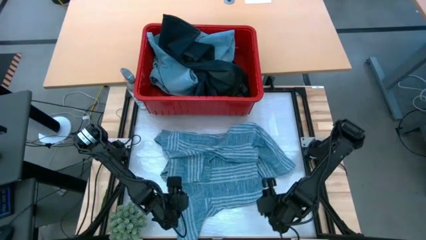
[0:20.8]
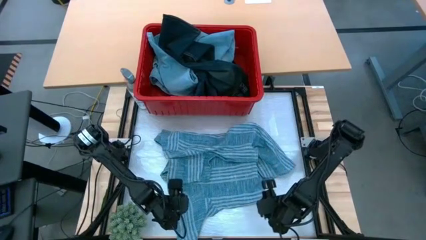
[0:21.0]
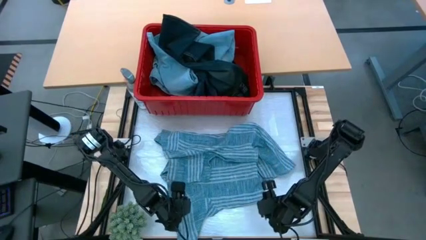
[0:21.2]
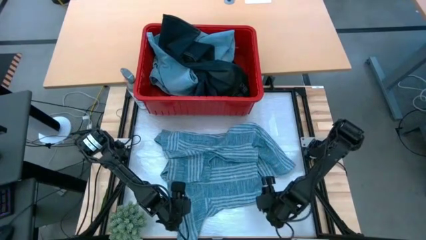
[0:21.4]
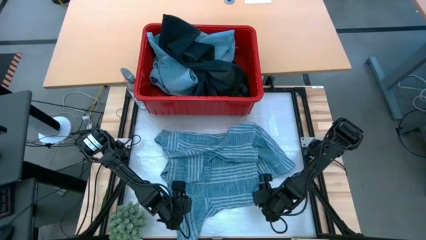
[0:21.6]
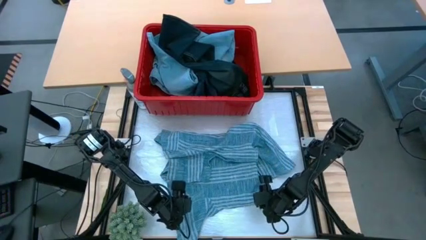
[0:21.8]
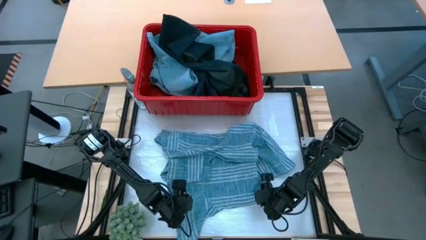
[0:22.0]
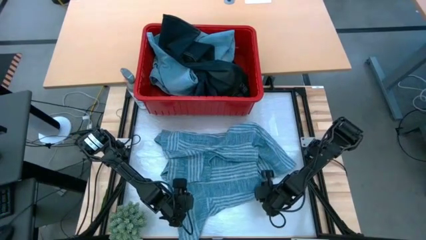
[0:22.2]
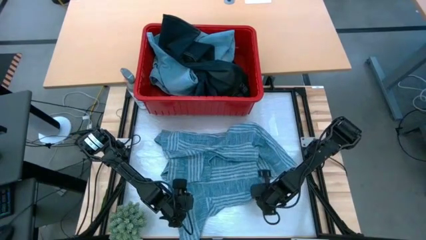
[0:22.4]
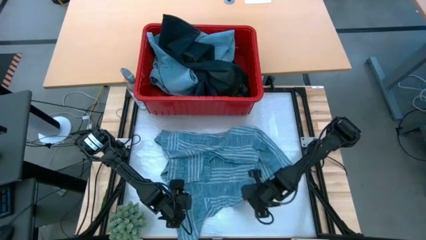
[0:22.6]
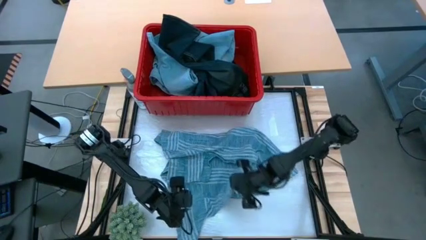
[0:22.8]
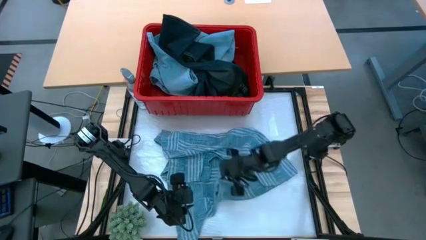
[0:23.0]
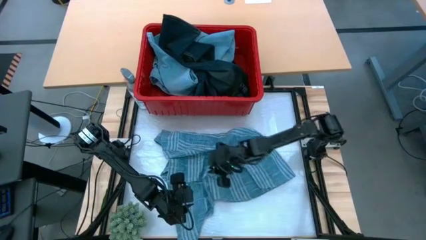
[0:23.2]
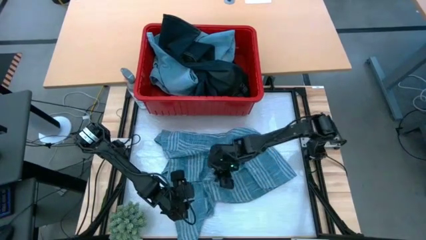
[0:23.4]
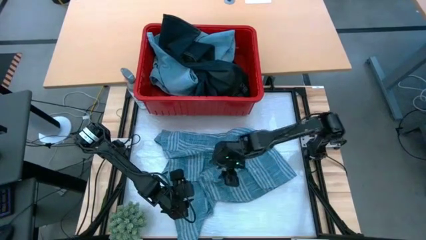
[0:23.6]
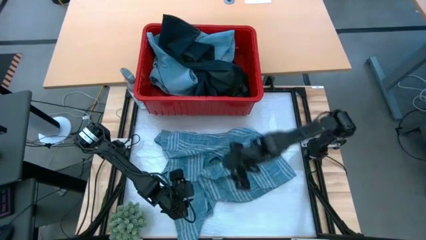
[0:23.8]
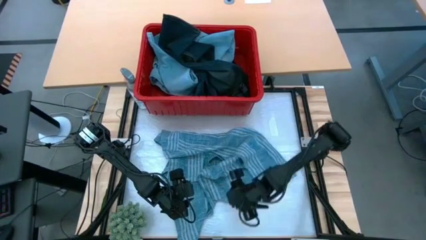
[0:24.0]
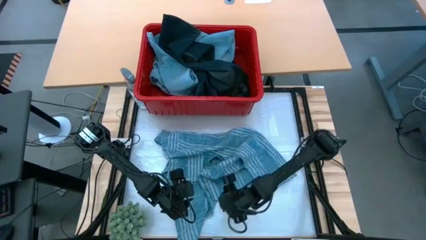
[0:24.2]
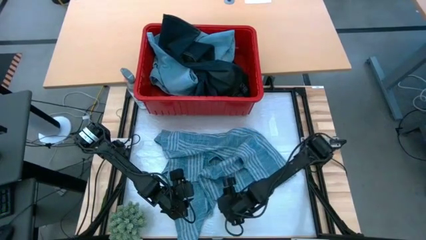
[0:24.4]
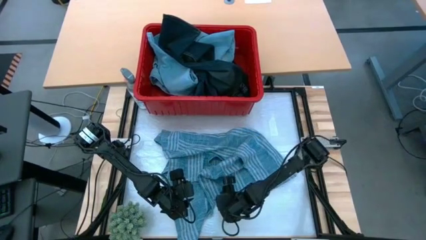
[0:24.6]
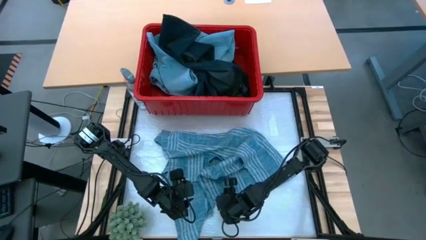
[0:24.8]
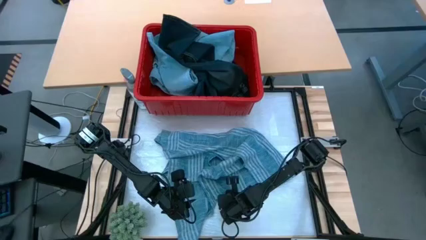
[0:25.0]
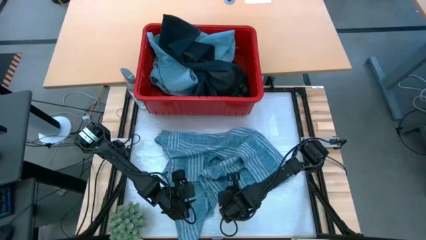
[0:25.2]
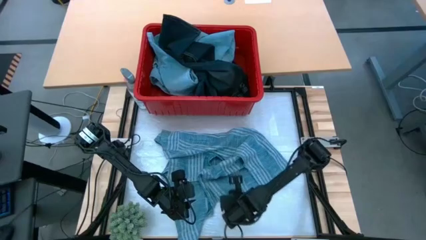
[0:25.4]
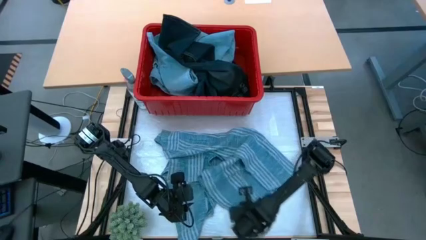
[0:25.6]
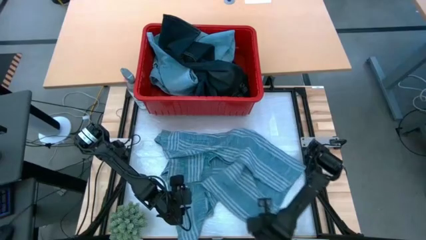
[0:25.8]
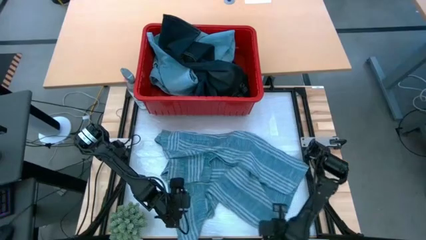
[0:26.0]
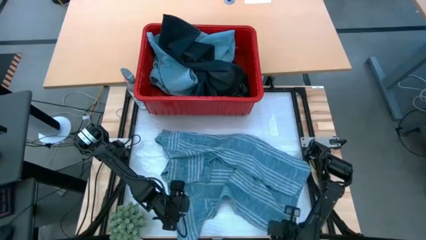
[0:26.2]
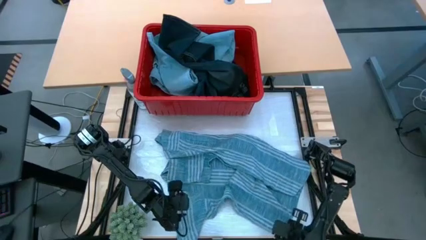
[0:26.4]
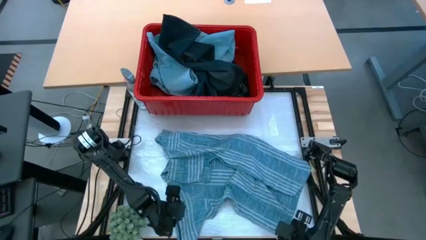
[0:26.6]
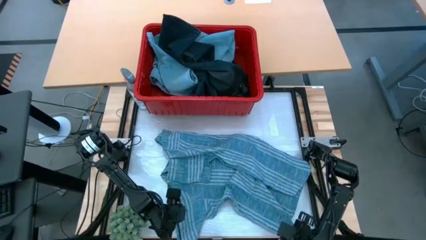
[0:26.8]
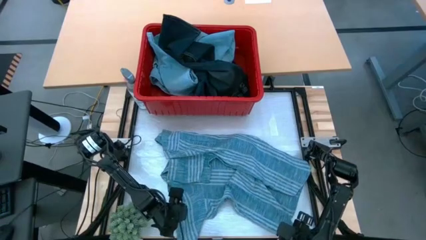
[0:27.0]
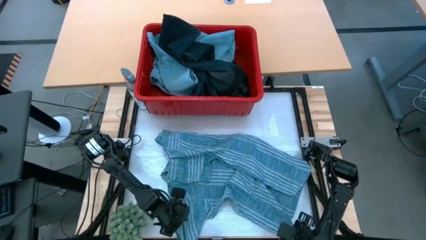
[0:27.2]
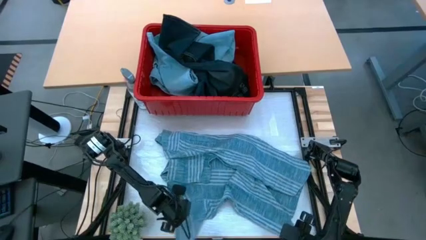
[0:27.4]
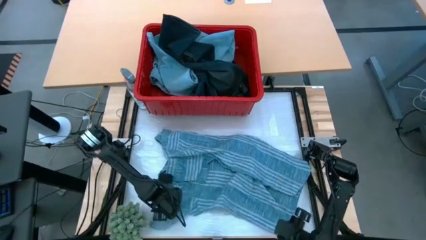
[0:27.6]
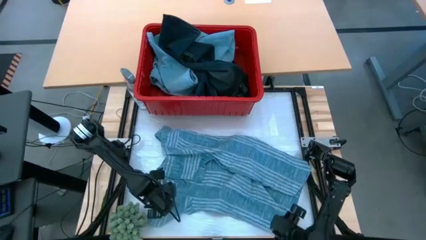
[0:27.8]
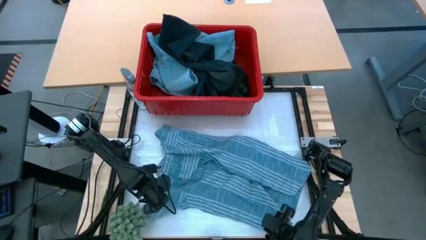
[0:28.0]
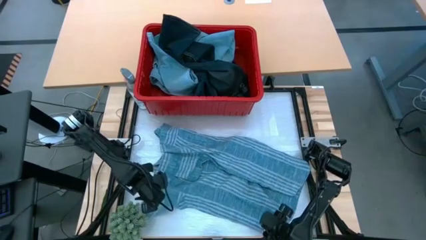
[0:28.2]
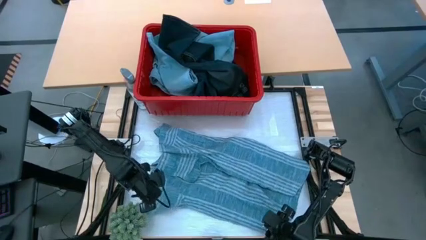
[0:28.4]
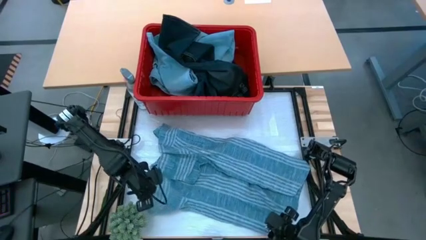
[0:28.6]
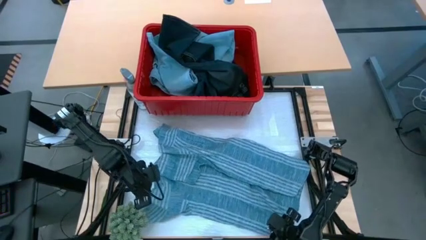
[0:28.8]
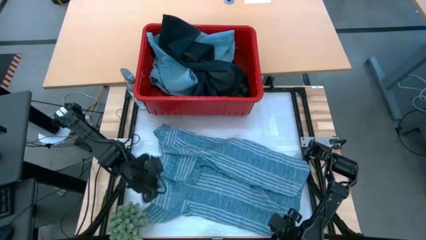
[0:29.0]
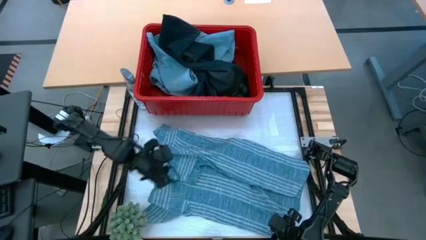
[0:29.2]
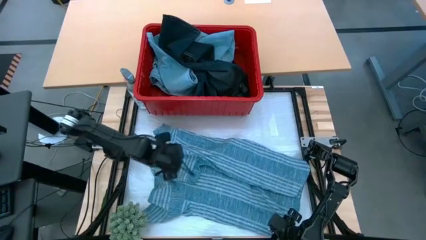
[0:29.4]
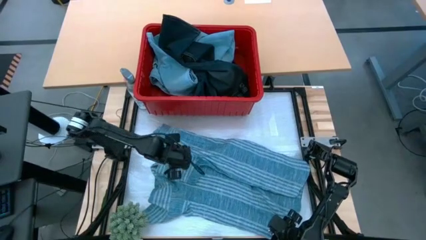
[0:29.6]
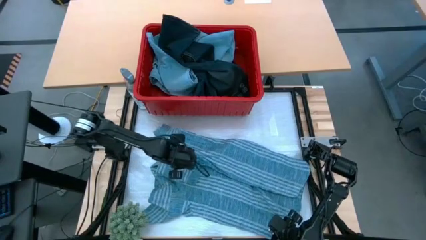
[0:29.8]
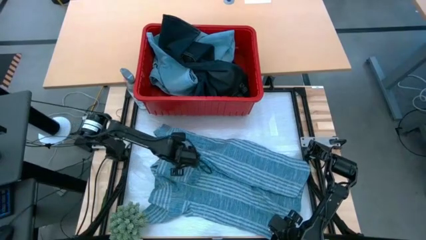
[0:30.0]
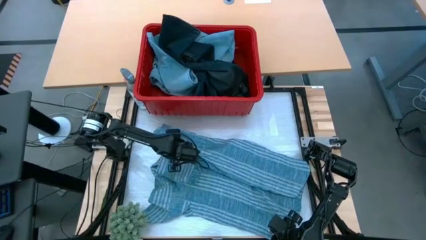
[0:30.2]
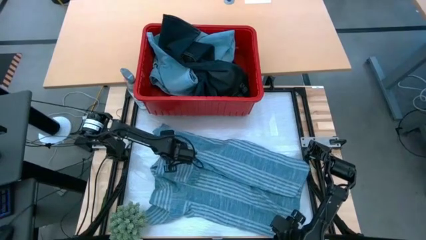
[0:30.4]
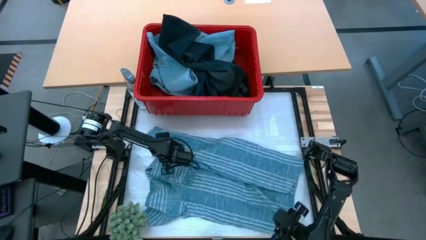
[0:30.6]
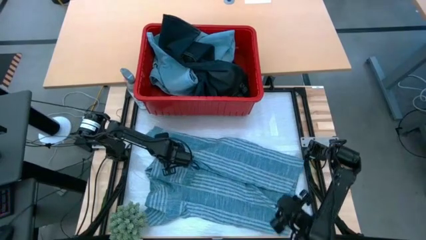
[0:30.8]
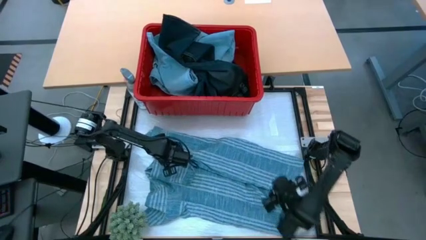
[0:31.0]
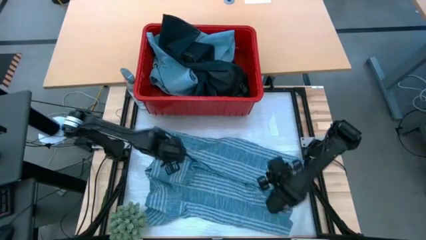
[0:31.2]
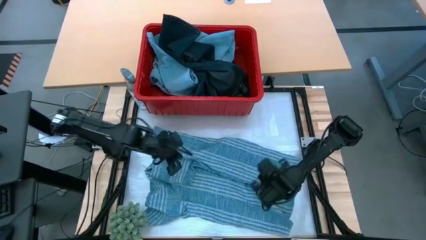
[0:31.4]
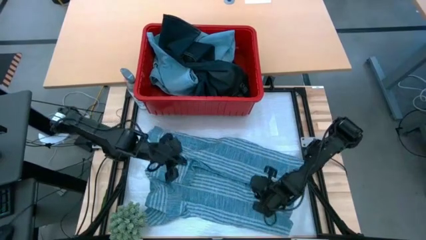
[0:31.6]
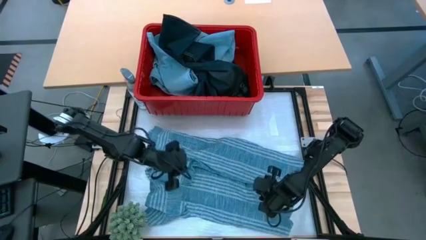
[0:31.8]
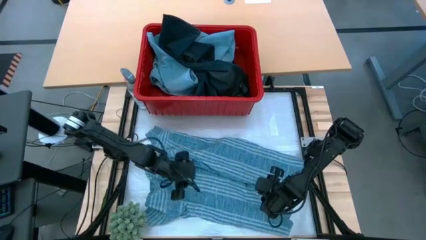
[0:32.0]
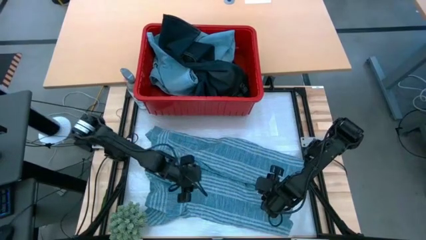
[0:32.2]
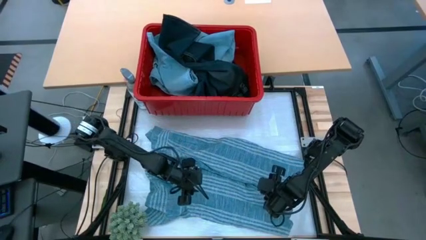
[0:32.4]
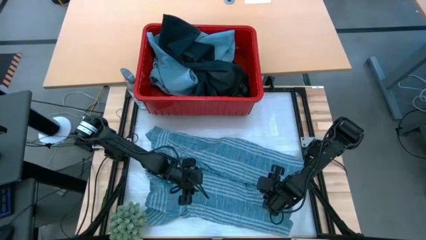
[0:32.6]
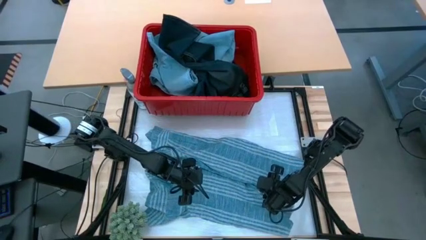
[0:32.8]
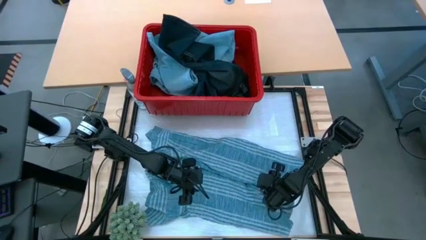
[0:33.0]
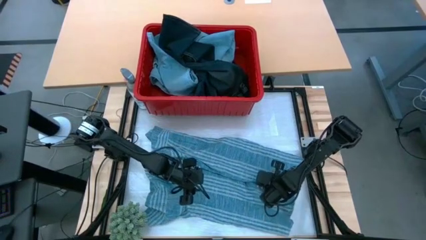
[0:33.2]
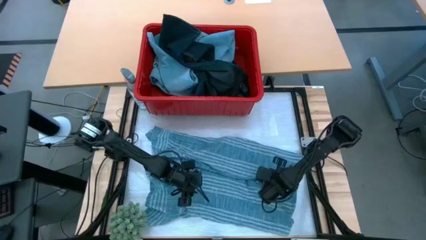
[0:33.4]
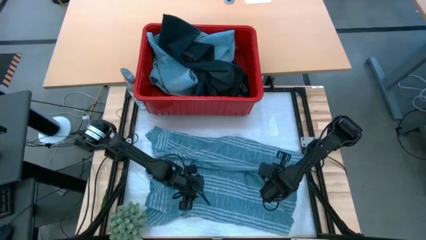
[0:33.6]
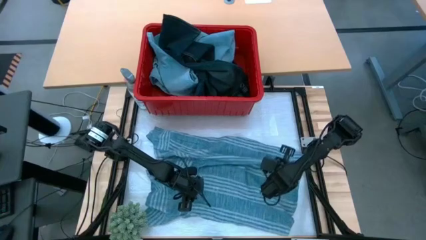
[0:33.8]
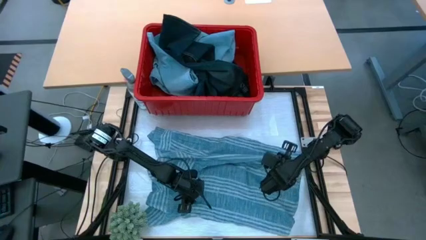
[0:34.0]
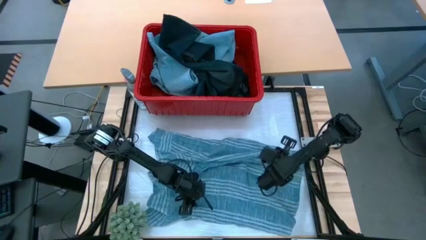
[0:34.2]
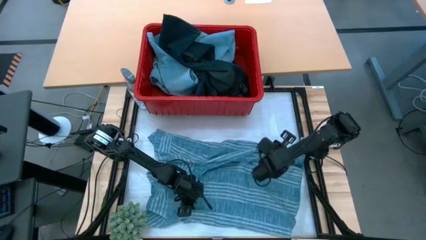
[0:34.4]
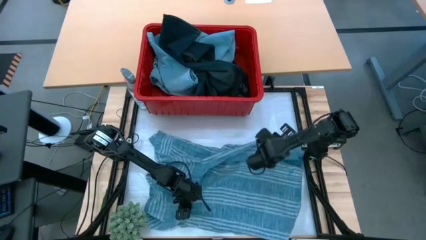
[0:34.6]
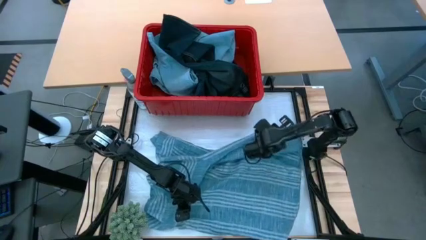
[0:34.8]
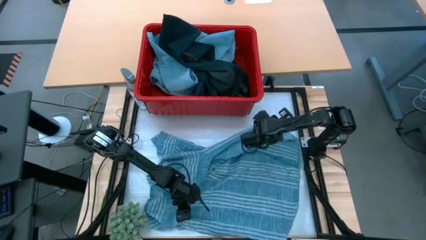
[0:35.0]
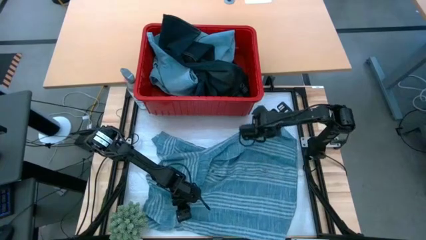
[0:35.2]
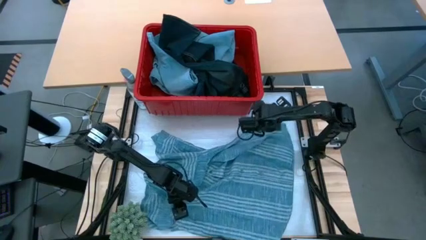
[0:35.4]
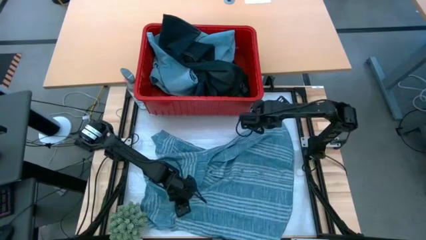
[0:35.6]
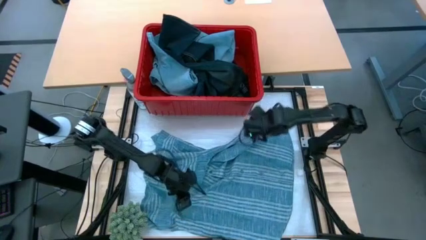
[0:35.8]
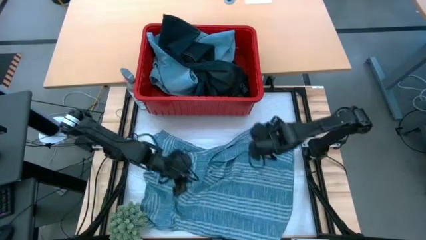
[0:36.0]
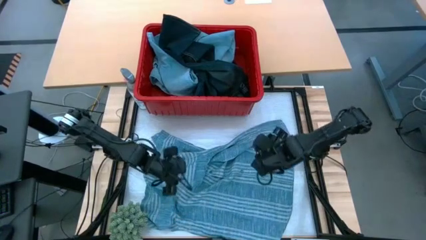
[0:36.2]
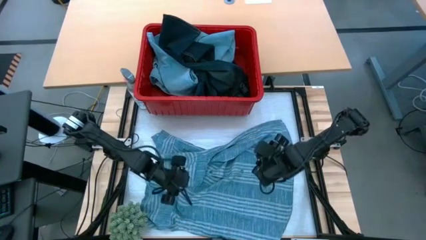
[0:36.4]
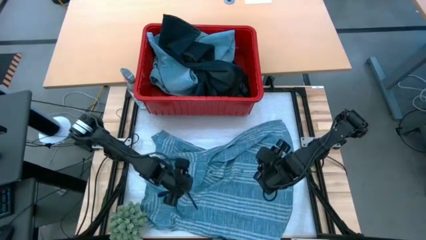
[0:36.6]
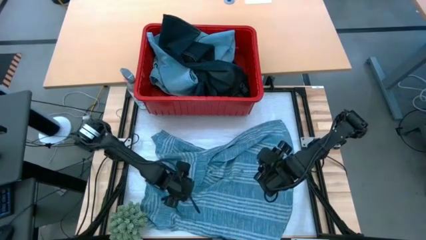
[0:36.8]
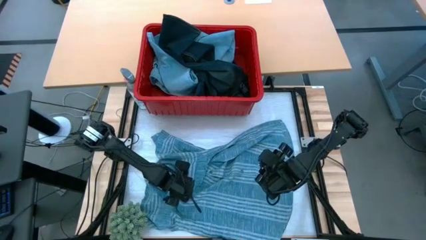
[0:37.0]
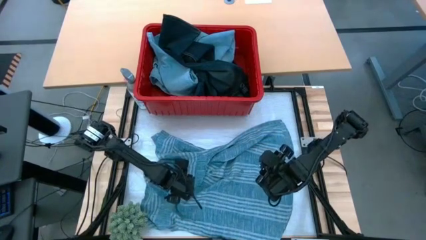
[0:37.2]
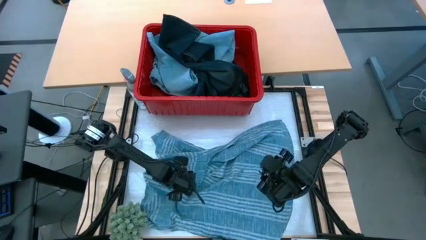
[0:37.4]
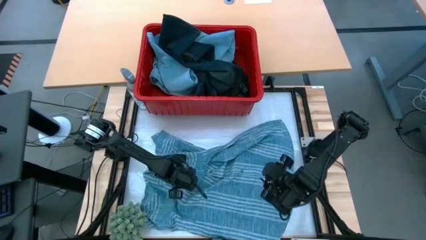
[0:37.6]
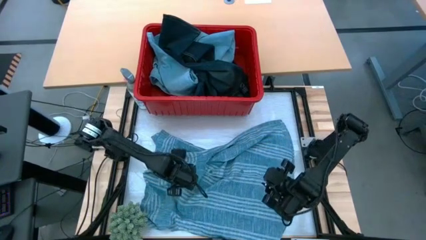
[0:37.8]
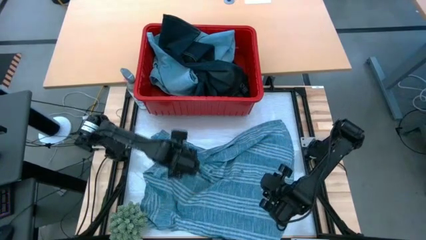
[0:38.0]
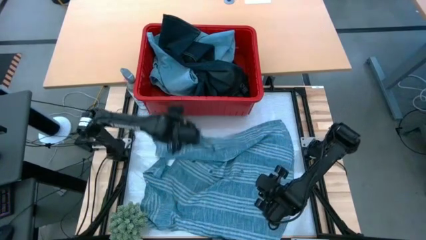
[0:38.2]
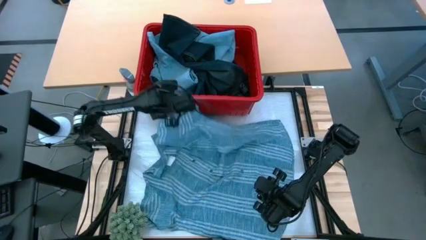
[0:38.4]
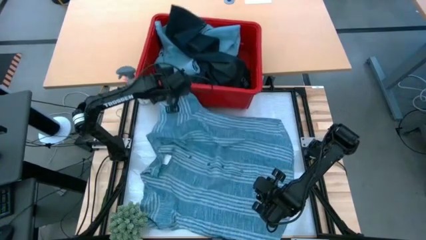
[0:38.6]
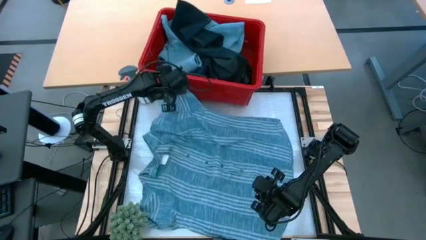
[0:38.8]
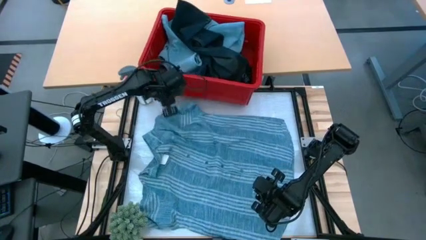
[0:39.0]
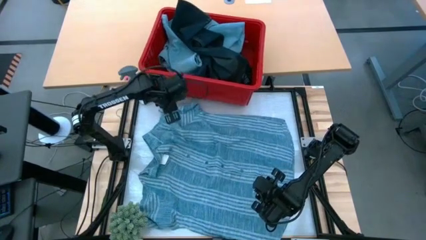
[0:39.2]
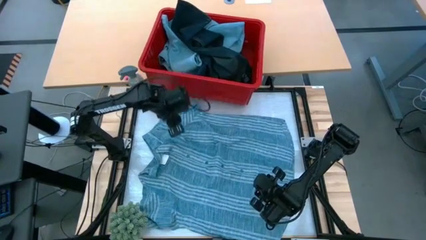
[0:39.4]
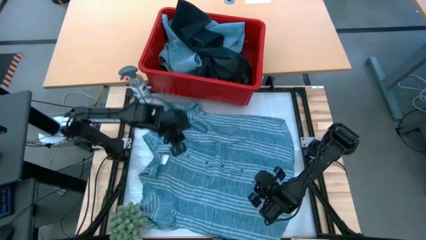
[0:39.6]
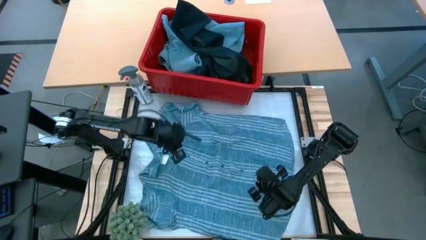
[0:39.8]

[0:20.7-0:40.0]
Task: Fold Laundry from Bin
Fold the light blue shirt
